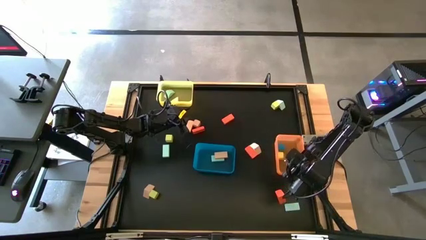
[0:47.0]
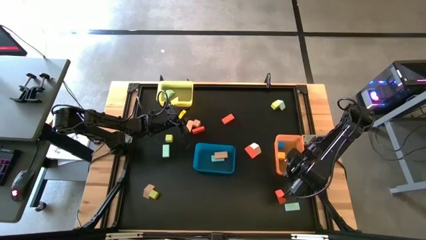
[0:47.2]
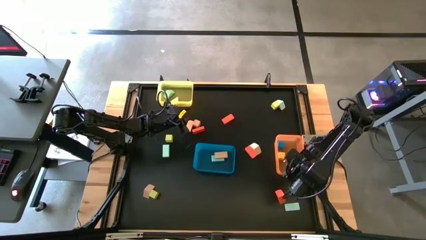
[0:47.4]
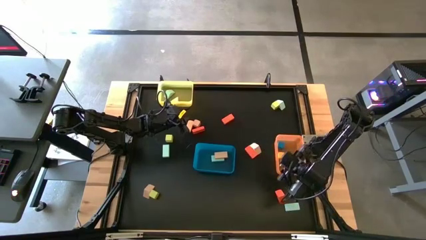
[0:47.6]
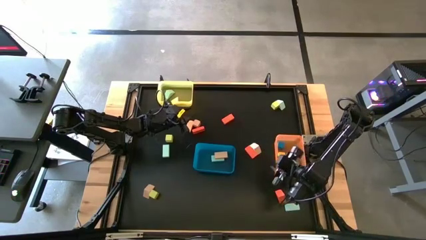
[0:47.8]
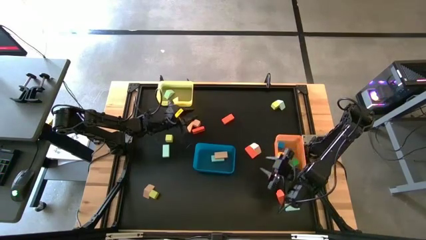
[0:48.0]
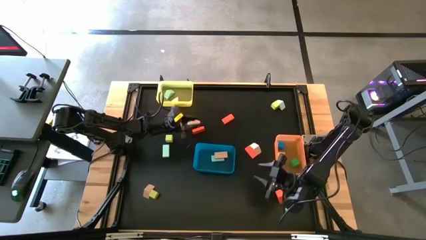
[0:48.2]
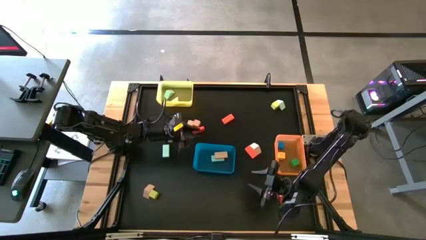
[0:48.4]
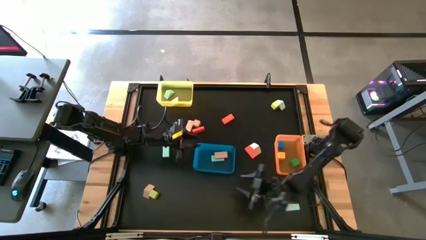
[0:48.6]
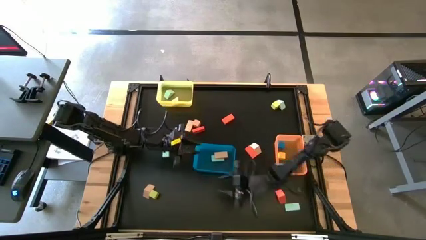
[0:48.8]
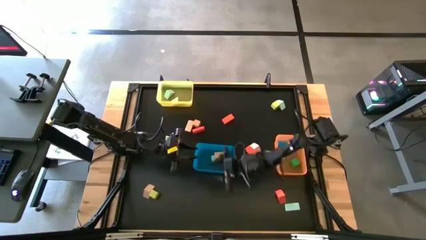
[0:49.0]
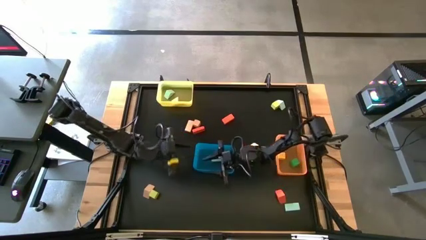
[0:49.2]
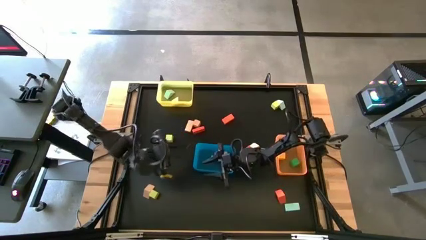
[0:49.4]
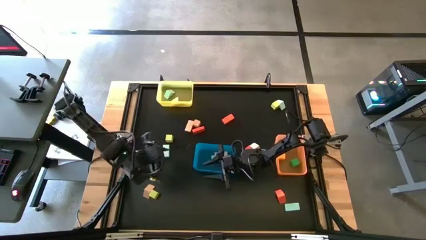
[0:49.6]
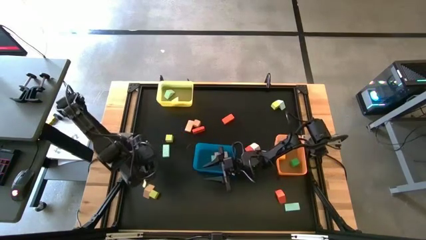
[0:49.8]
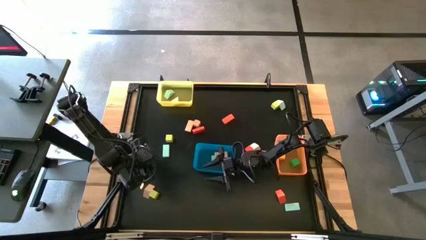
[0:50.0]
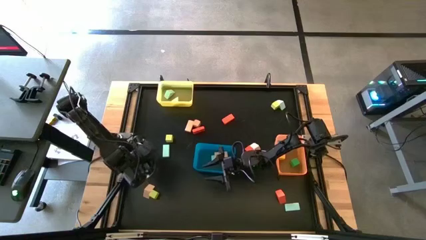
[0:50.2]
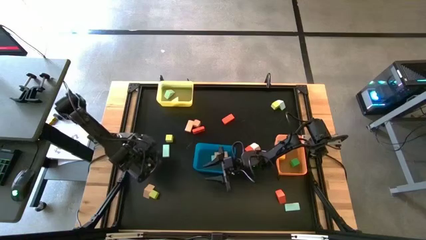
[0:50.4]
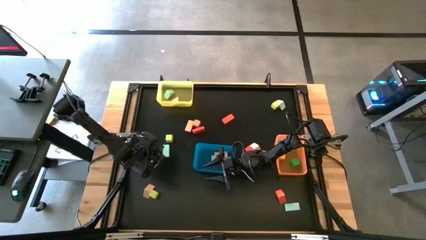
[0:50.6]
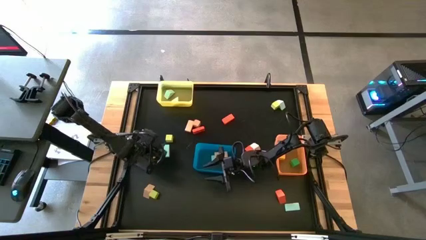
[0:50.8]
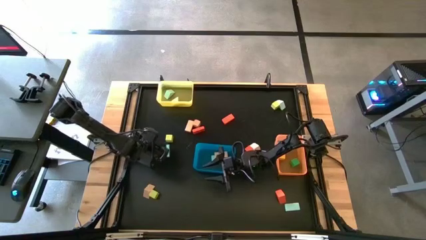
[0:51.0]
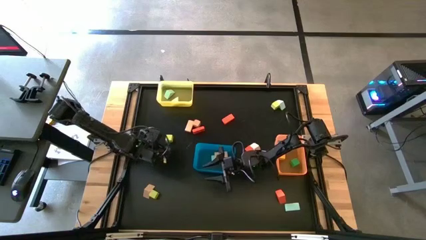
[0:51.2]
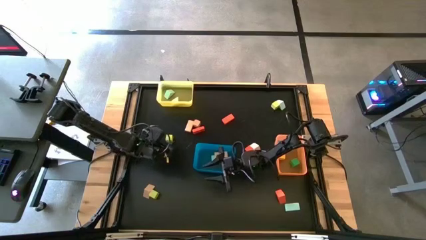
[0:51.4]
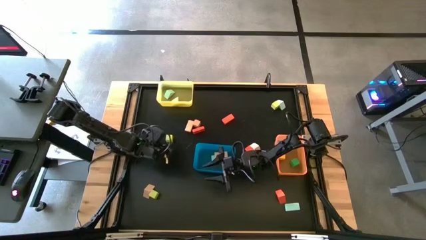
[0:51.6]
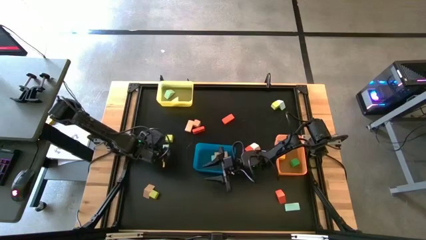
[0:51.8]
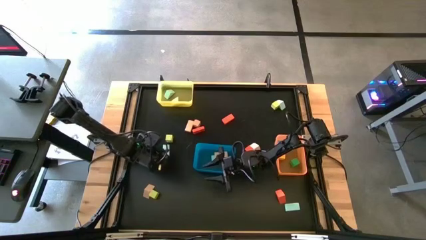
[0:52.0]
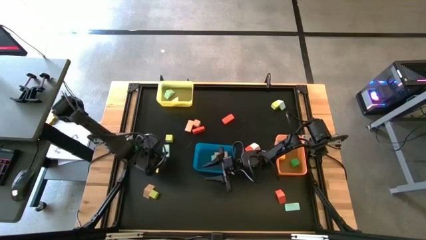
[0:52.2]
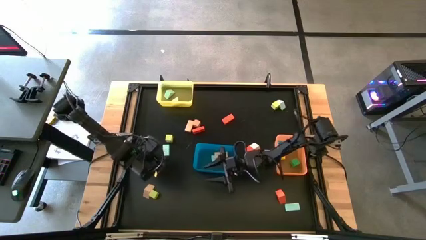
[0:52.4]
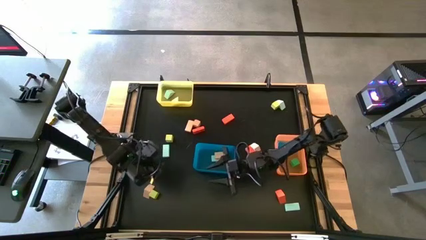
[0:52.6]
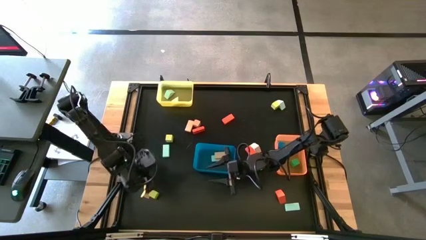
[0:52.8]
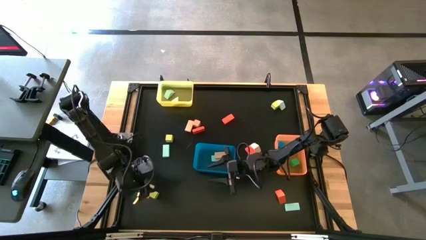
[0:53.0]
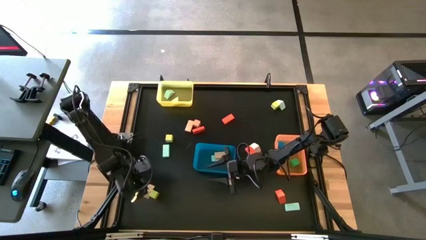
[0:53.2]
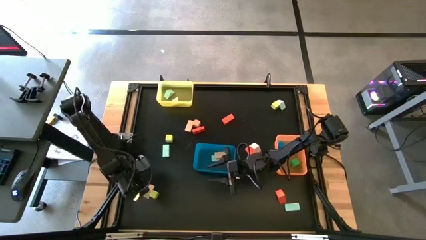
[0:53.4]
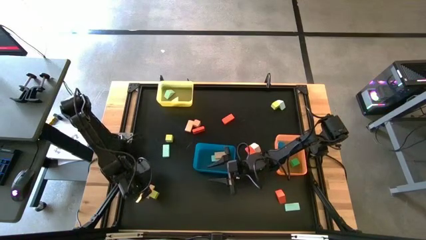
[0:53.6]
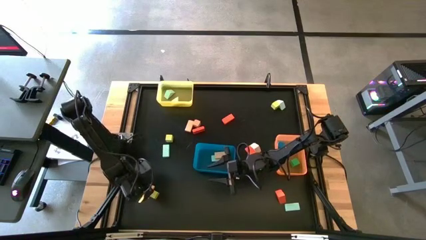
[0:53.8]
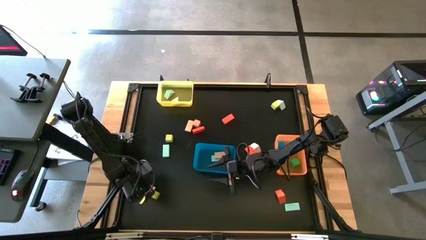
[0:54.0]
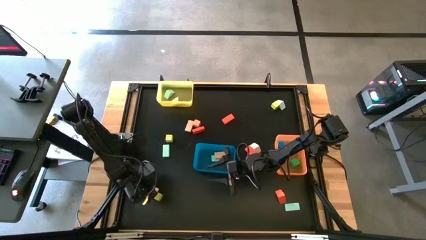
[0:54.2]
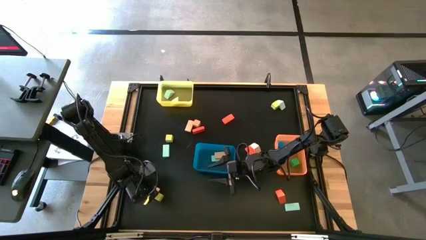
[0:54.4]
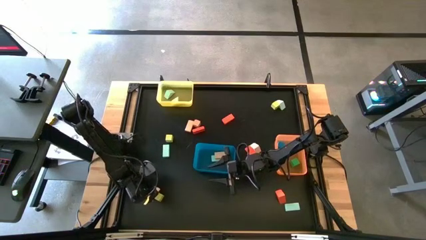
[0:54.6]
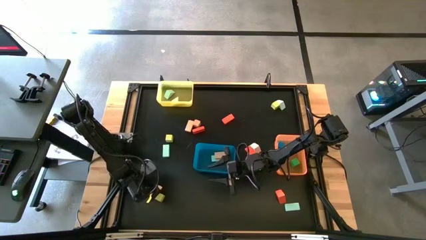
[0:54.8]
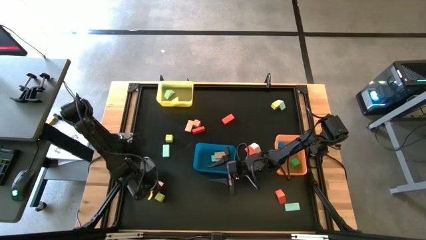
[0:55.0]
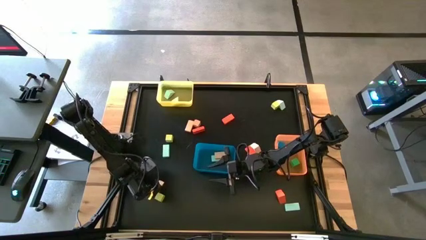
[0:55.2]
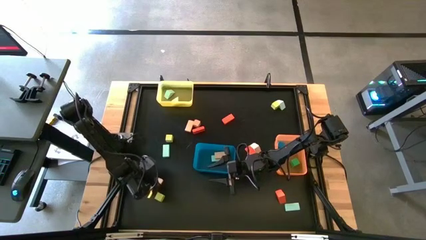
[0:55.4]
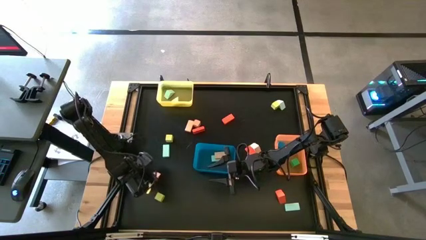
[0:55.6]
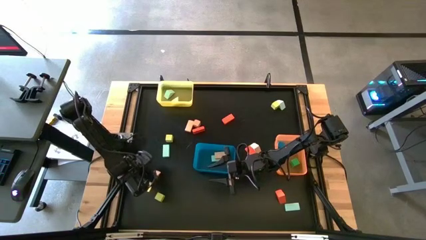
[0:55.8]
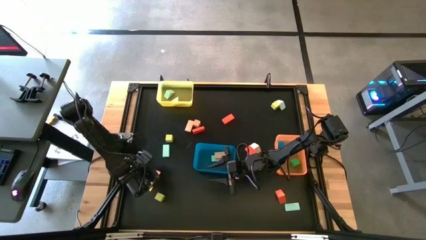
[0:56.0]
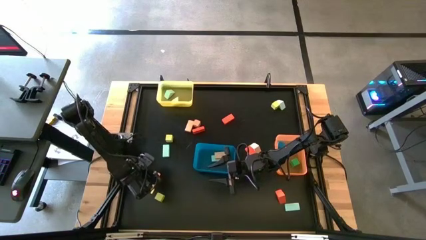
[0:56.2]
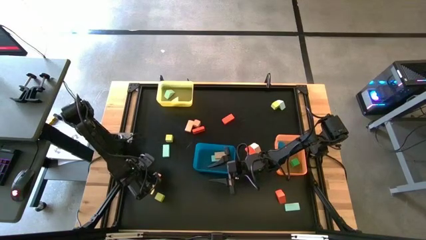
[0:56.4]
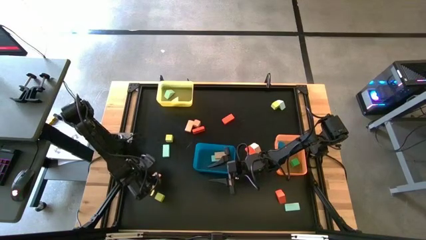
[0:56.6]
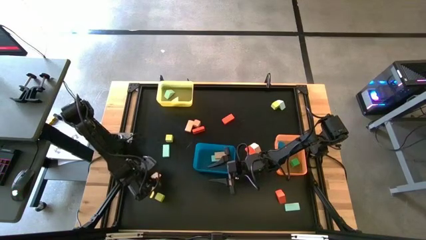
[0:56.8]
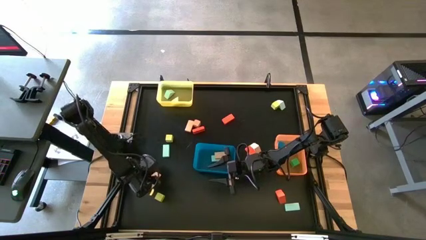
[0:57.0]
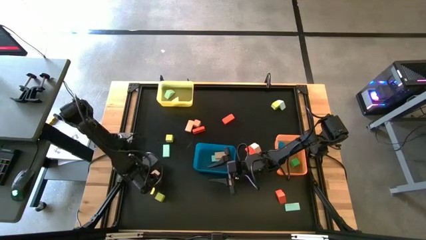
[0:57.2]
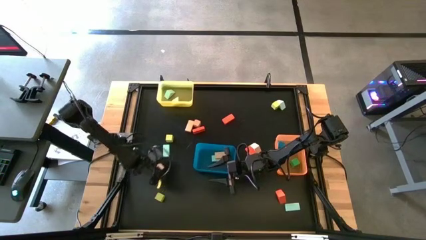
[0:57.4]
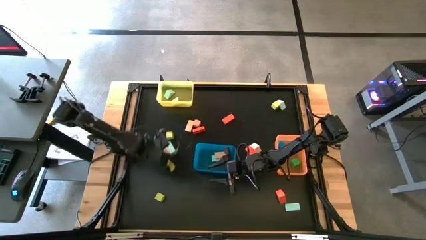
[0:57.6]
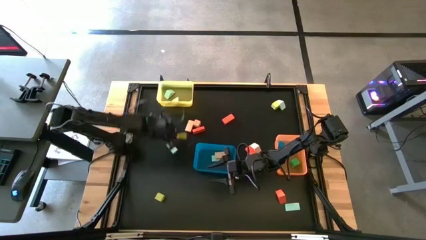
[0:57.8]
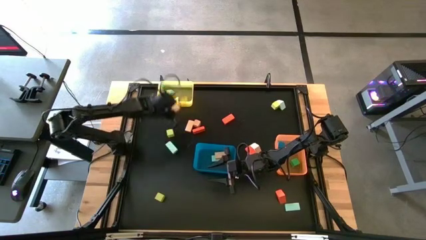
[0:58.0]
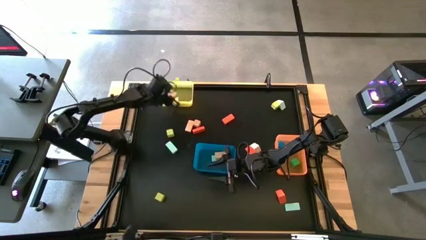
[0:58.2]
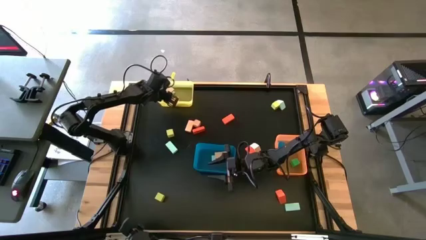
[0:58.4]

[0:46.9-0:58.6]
Task: Sort blocks by size
Put the pink triangular block into the yellow bin

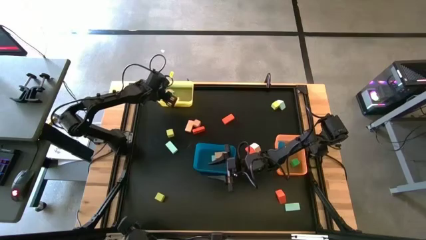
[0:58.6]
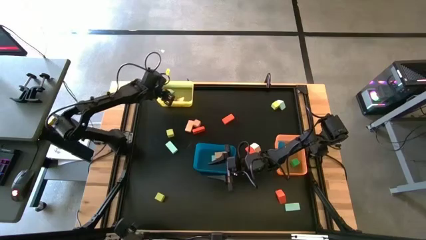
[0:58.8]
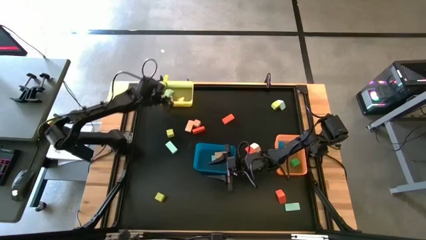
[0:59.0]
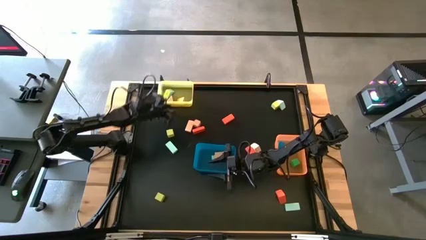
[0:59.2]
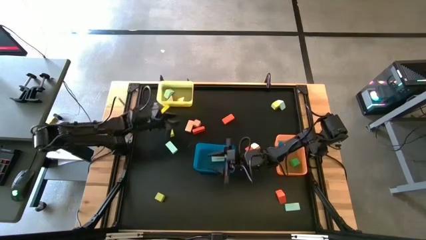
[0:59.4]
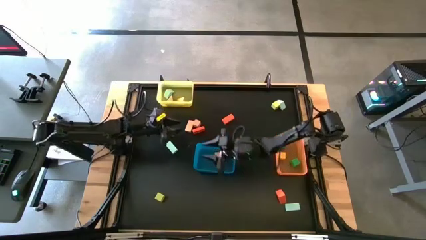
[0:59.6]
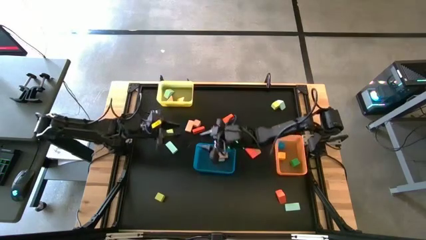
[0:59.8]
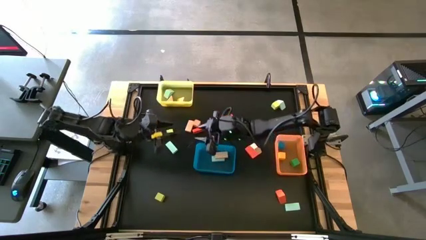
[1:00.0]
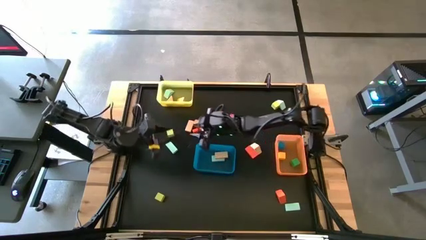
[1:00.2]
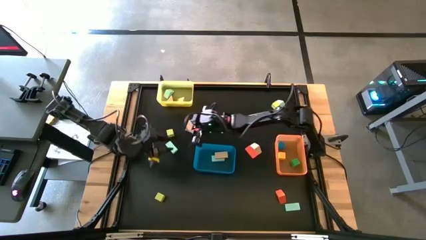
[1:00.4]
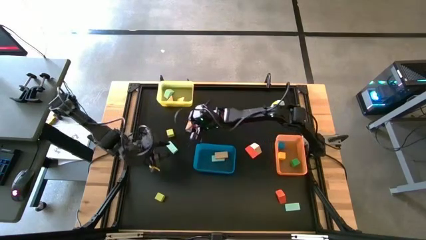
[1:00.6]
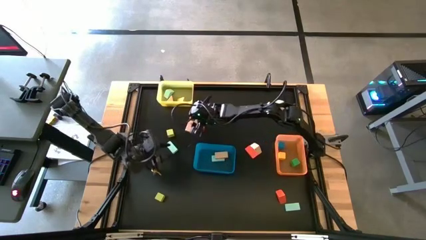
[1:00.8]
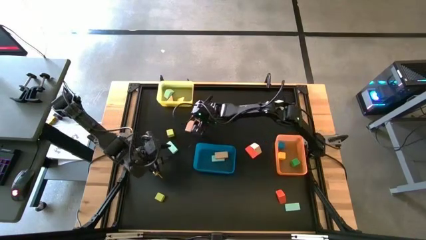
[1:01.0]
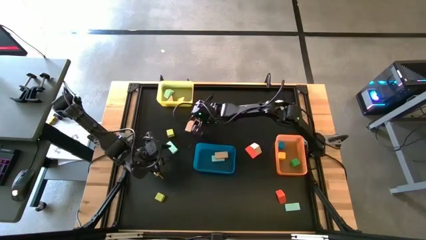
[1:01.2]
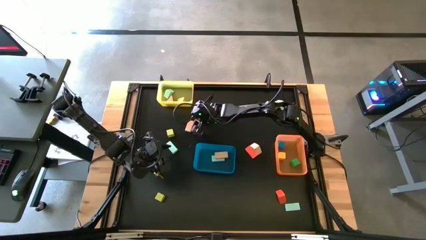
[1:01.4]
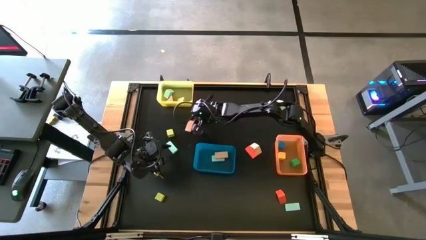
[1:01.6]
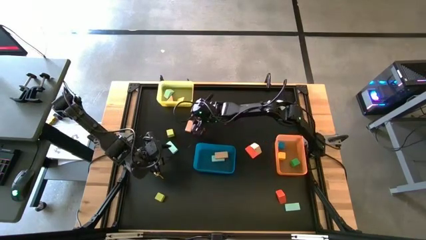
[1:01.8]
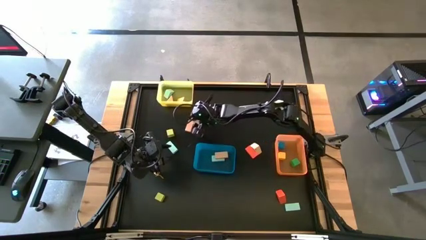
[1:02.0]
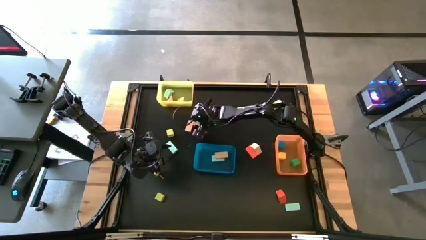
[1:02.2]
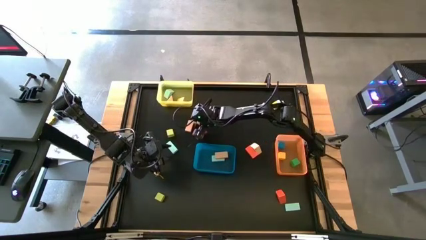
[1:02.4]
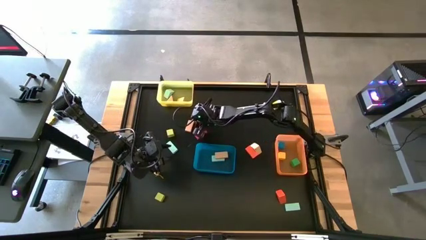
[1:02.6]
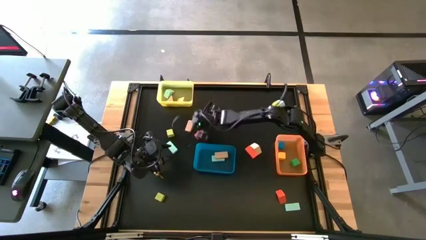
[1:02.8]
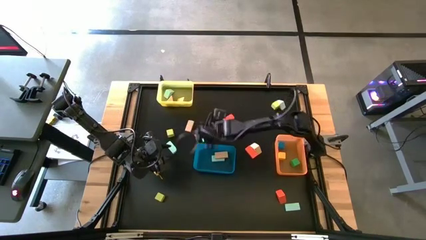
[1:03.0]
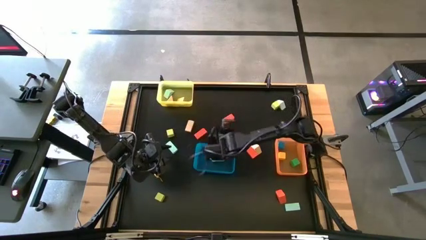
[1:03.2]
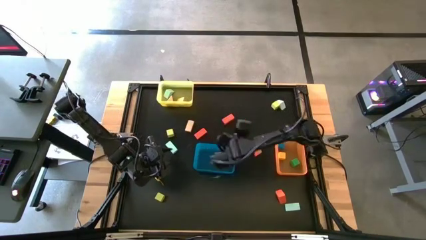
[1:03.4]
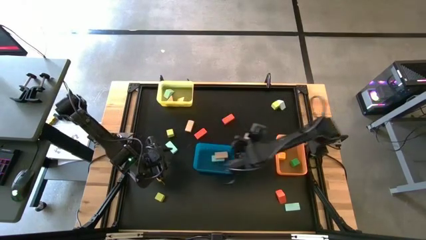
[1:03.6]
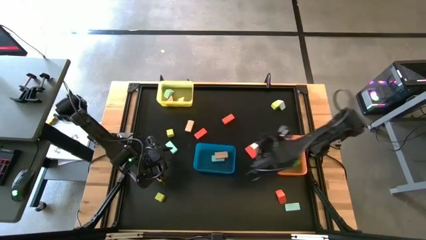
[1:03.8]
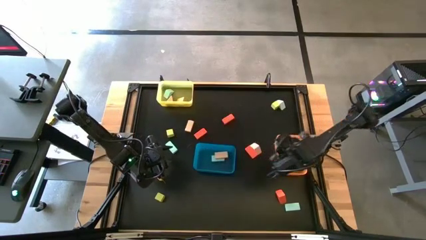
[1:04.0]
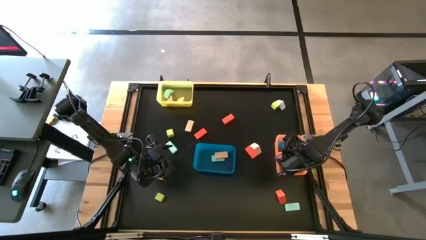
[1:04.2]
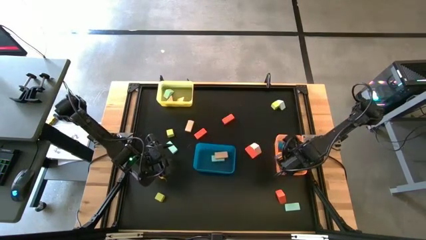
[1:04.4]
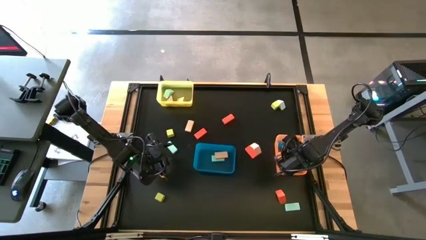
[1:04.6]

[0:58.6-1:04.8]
Put the light orange square block into the orange bin
